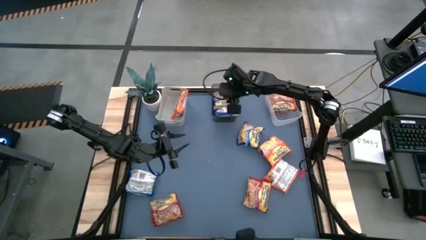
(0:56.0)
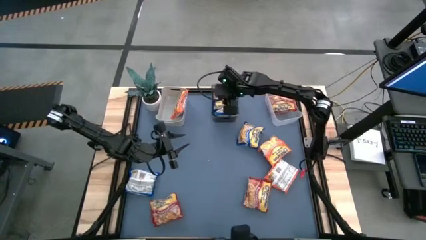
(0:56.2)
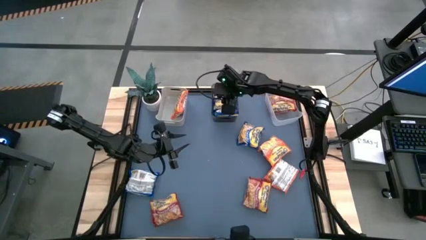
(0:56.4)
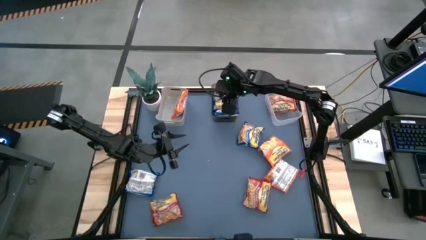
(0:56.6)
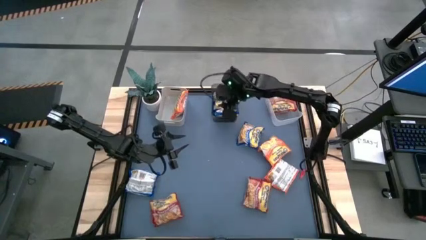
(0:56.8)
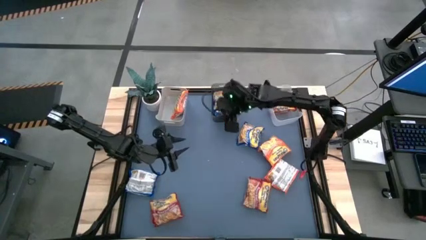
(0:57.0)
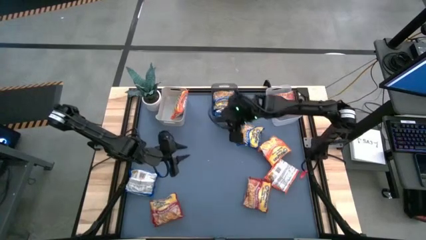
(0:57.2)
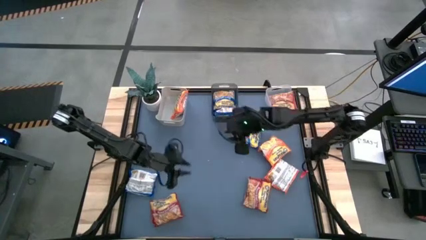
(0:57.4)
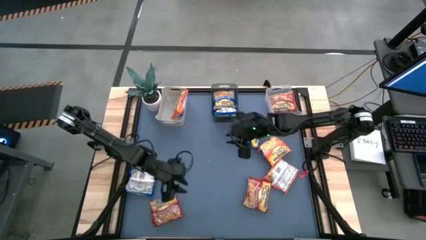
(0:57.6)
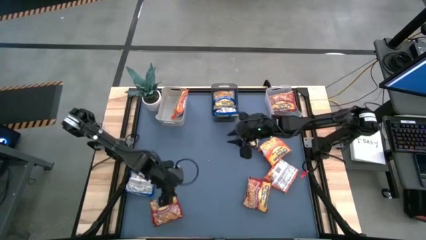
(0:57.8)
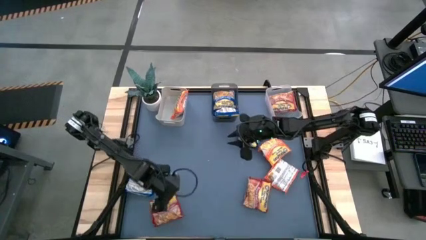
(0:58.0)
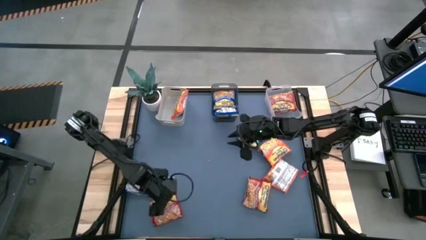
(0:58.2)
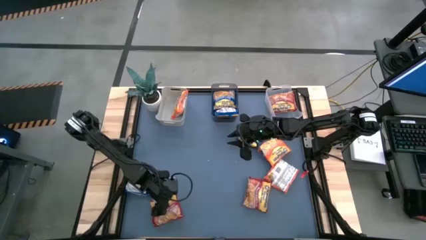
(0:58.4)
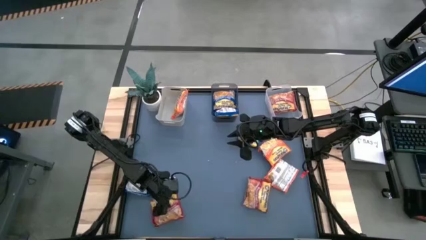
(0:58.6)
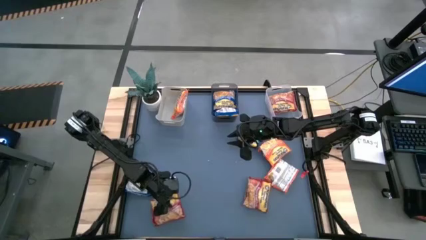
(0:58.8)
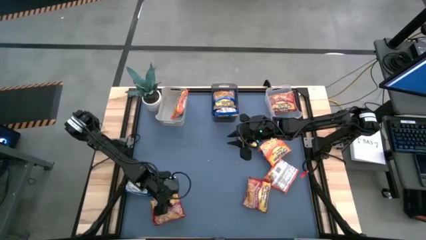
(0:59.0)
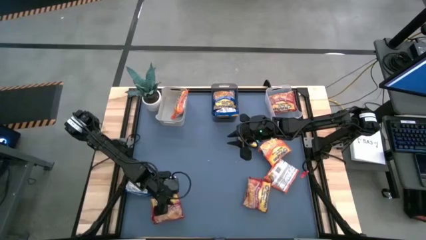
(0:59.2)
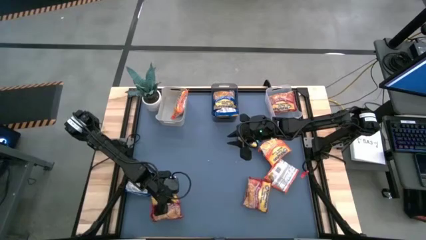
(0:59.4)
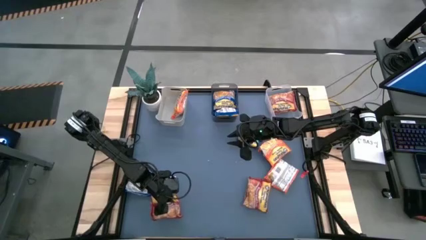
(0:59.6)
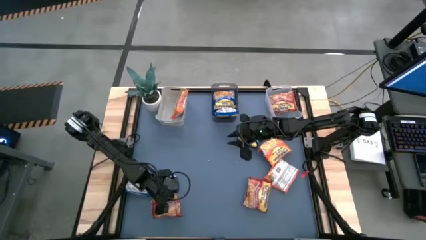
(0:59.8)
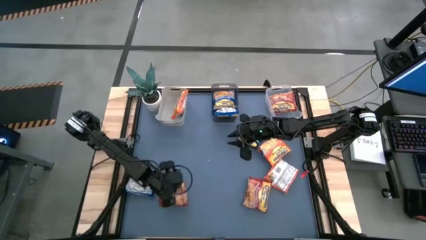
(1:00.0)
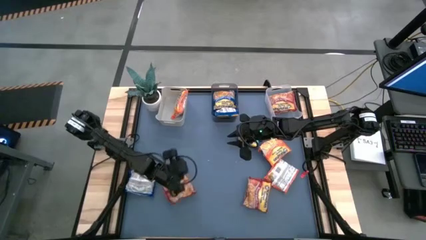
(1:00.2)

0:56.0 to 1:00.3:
Task: Sort Maruchan noodles
Put the red noodle pack into the transparent bin

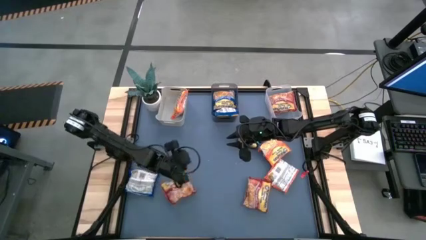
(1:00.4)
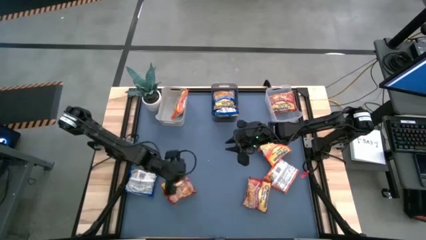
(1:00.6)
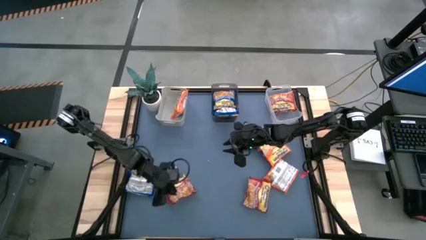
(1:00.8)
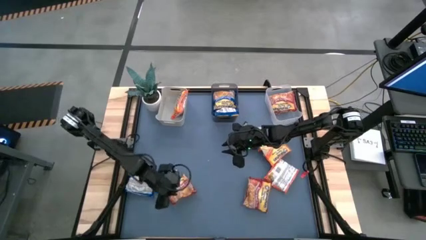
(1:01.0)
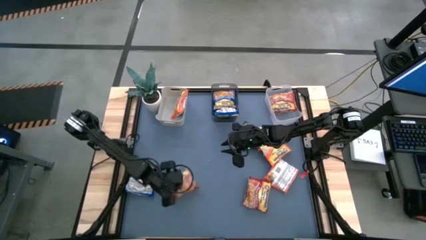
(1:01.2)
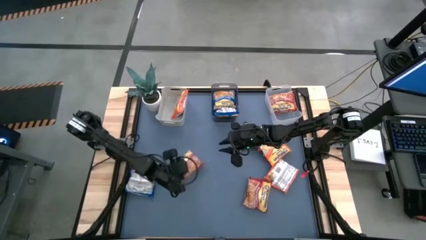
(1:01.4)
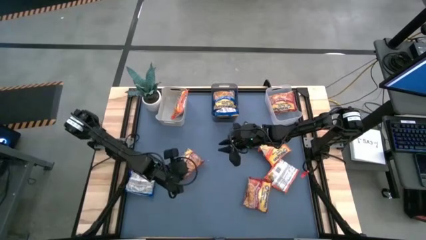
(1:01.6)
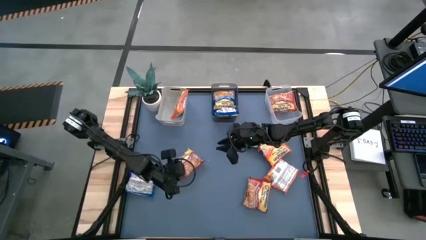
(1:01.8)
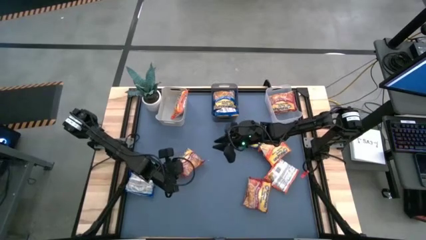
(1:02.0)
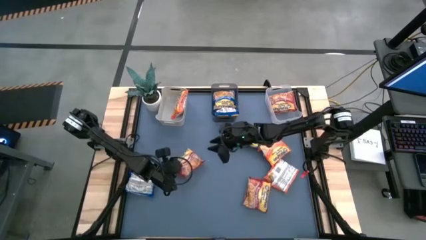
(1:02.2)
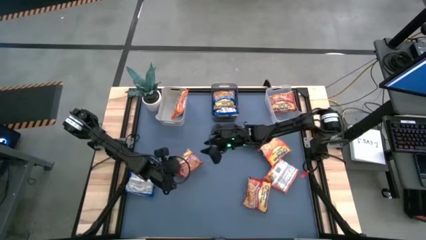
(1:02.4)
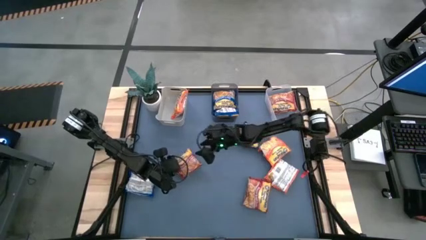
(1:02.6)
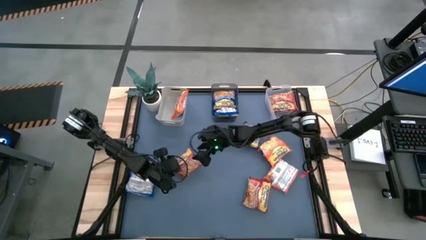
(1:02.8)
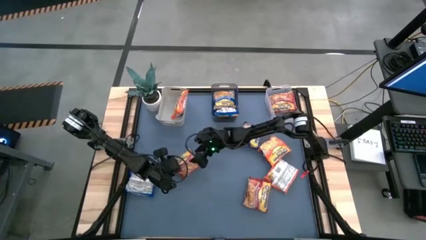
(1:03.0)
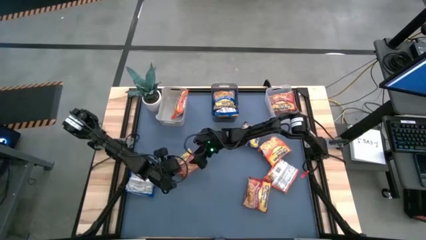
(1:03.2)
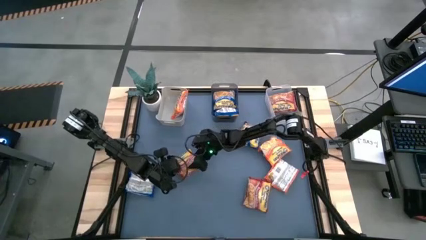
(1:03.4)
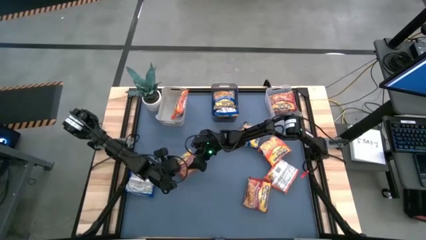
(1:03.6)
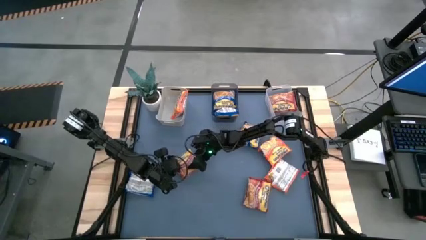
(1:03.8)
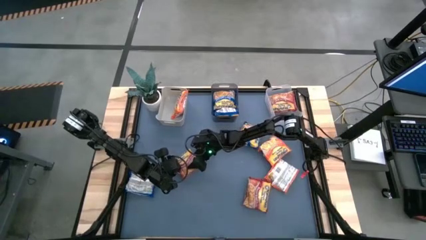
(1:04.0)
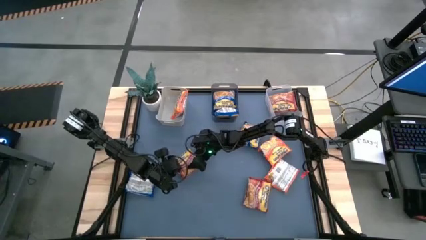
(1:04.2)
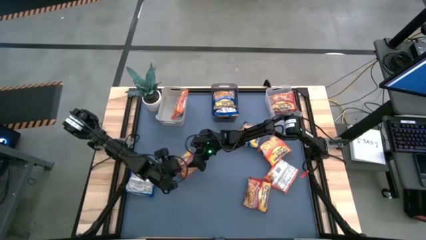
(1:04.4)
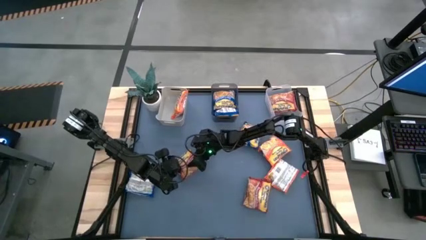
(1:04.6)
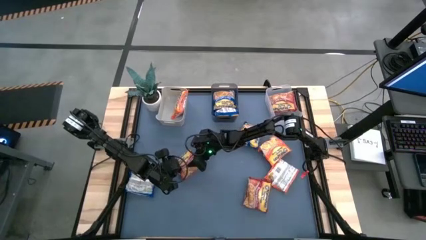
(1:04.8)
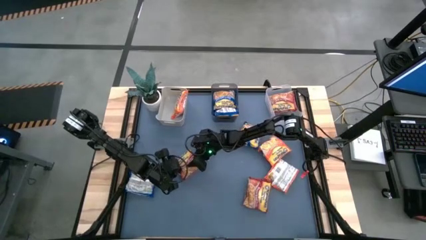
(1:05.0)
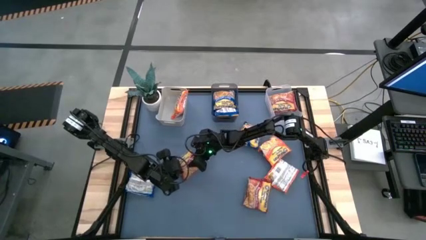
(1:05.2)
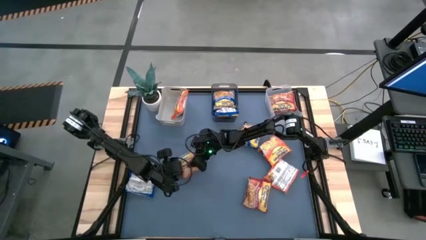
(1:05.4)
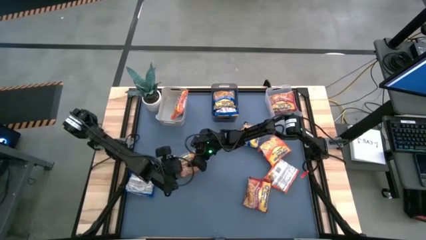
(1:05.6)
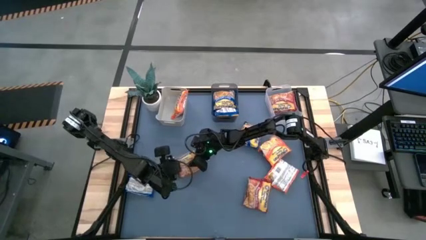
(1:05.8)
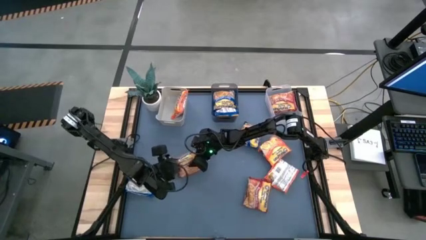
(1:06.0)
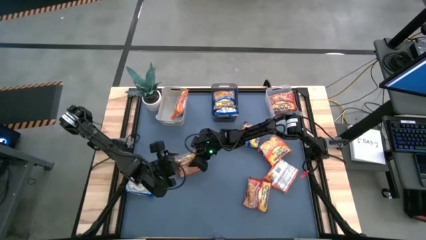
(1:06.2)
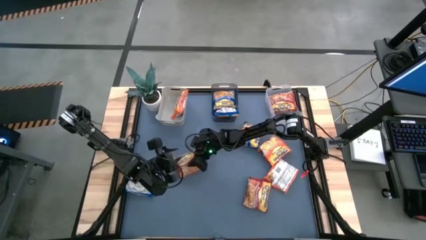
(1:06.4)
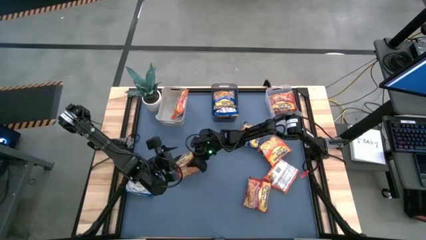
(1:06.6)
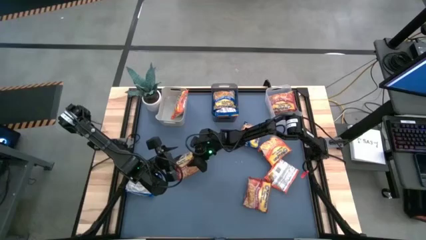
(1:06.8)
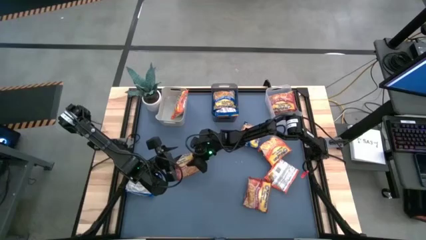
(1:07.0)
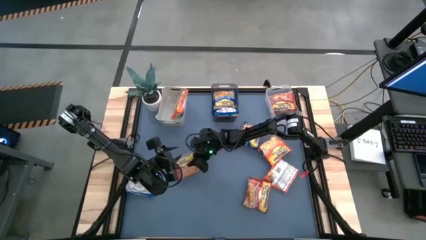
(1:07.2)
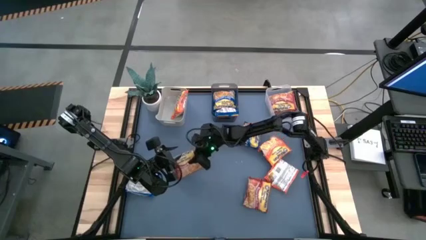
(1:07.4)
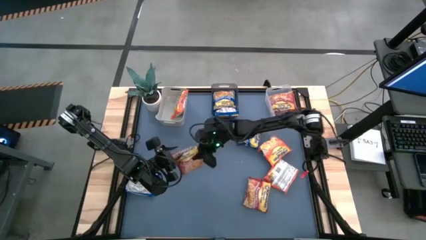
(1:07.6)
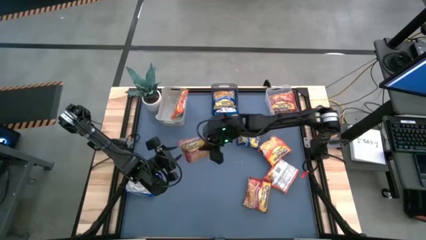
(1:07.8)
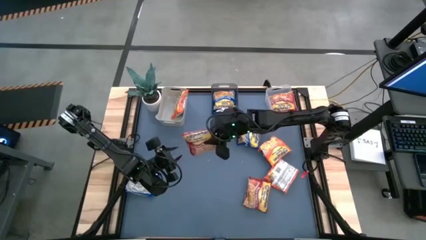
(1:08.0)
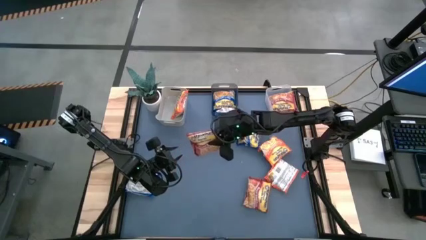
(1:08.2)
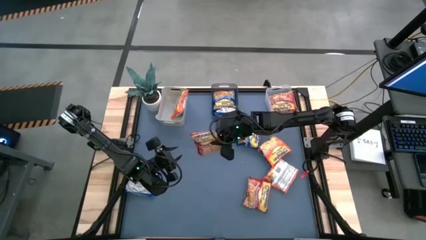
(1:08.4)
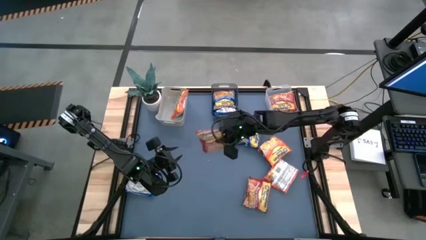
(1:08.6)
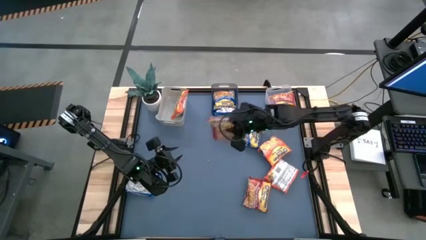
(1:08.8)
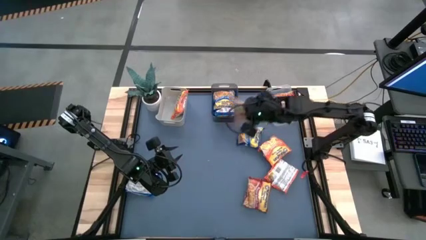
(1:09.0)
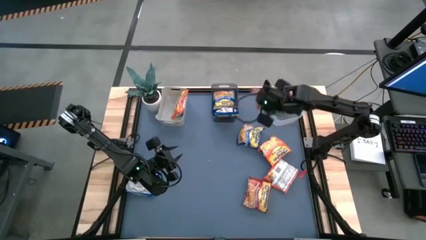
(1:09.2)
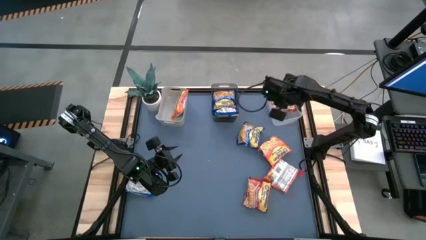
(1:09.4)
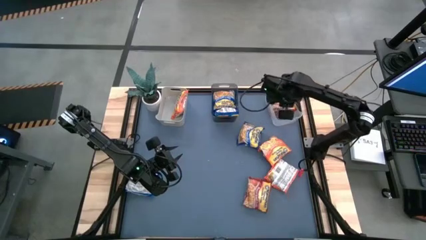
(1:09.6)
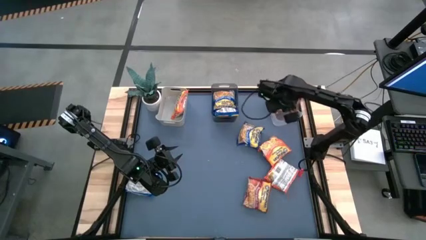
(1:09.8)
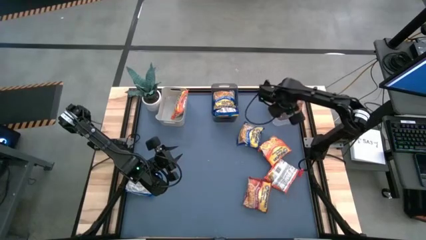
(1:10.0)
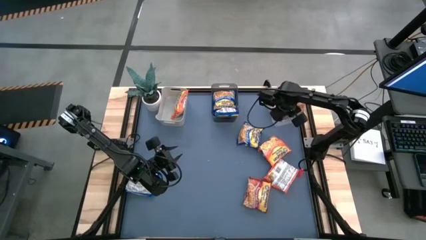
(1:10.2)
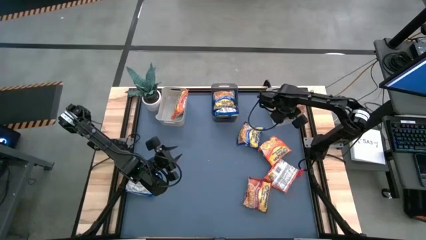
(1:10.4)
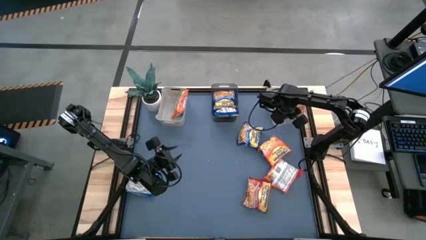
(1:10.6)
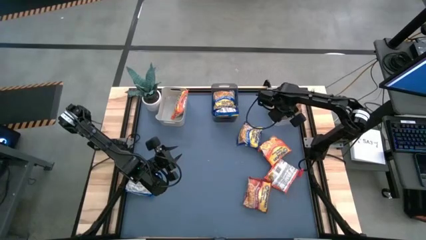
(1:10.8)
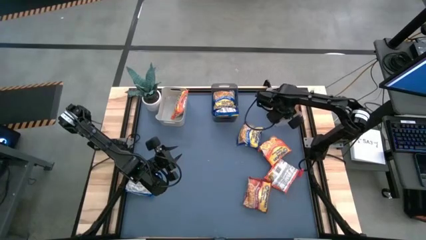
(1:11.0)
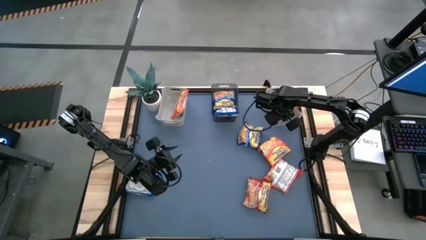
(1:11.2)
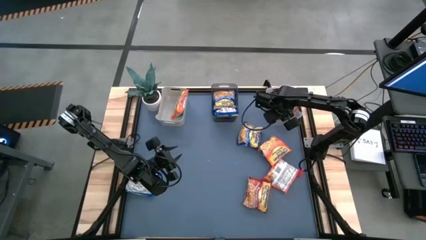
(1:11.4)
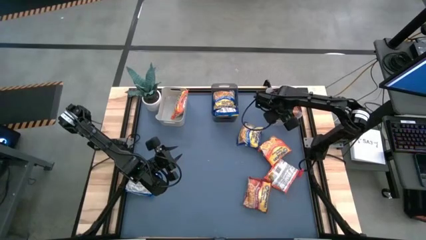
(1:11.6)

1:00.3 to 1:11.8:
Put the red noodle pack into the transparent bin

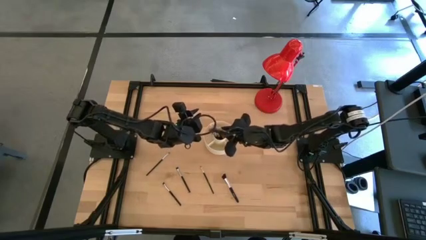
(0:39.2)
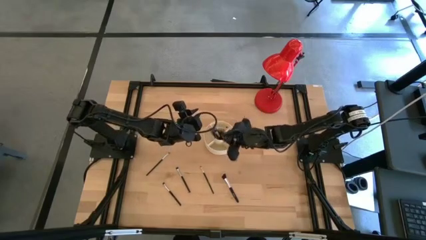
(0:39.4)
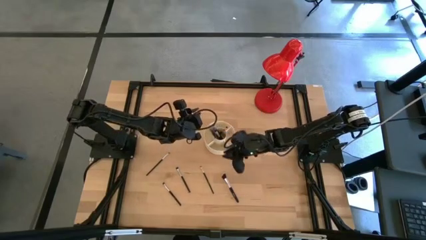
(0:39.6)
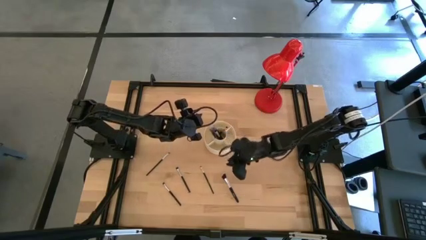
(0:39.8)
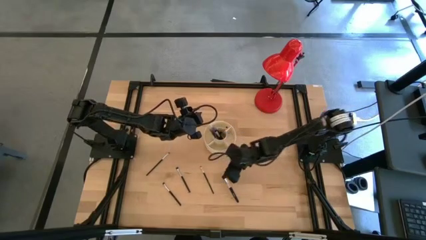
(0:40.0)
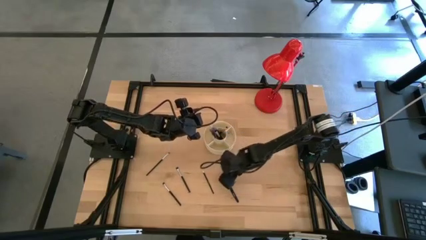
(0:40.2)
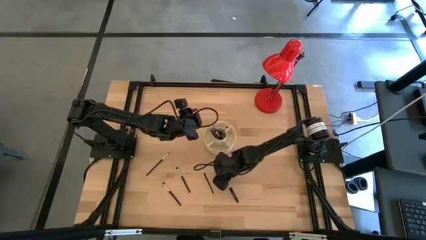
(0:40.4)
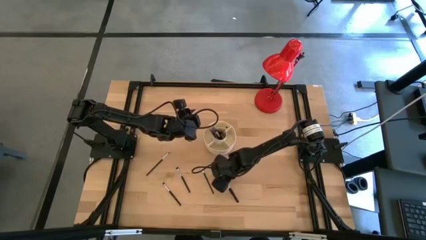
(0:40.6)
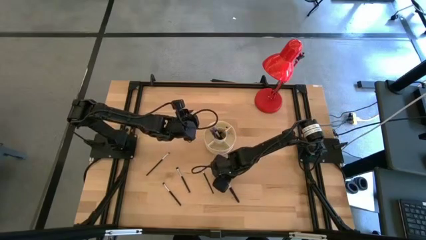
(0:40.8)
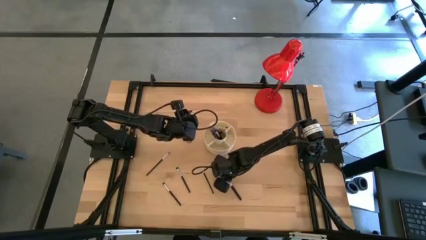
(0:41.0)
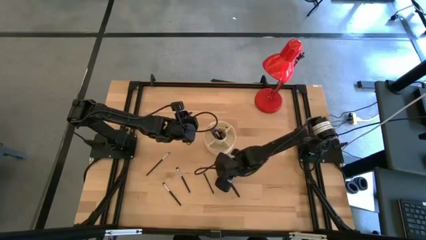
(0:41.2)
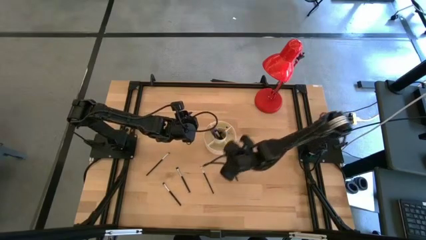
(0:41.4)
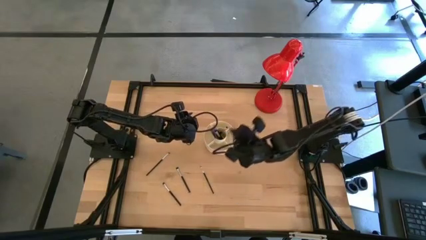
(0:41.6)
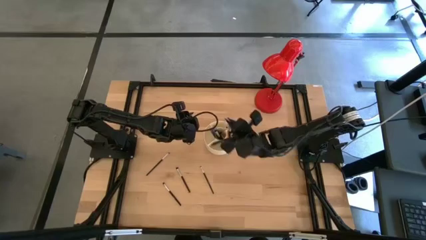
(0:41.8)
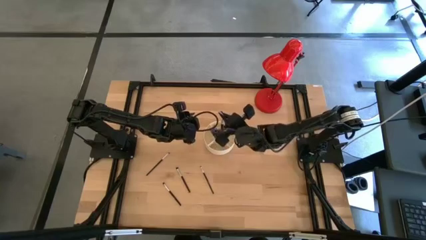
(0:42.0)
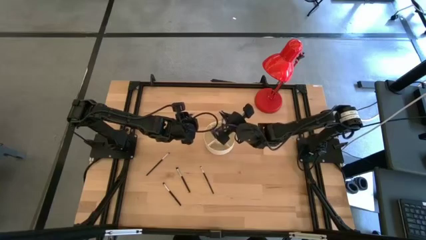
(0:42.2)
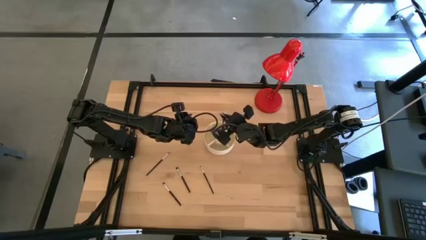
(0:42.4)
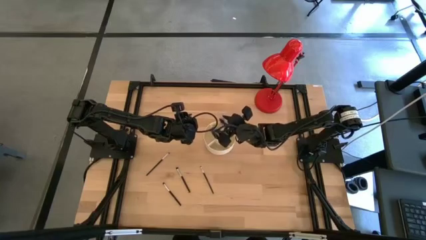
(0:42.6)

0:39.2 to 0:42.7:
Task: Put items in baskets/containers
Put the blush brush into the brush organizer
